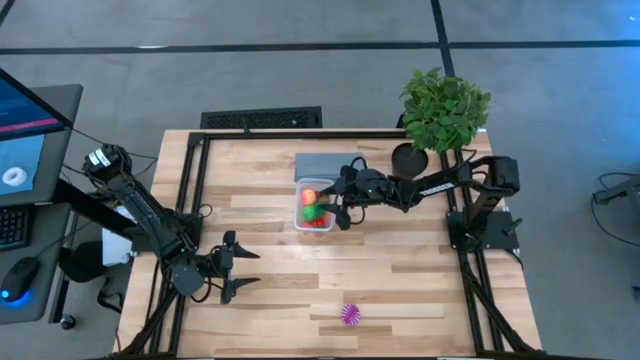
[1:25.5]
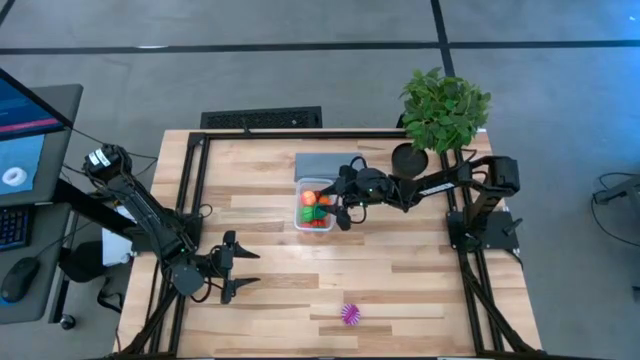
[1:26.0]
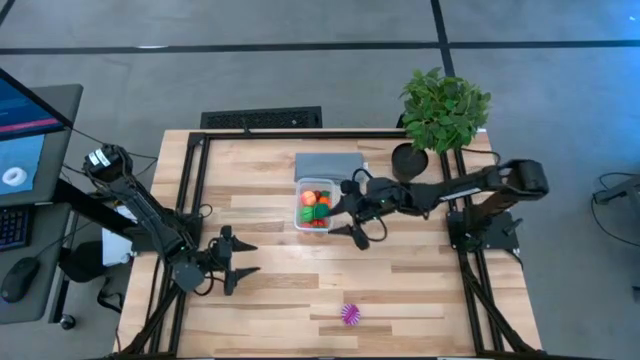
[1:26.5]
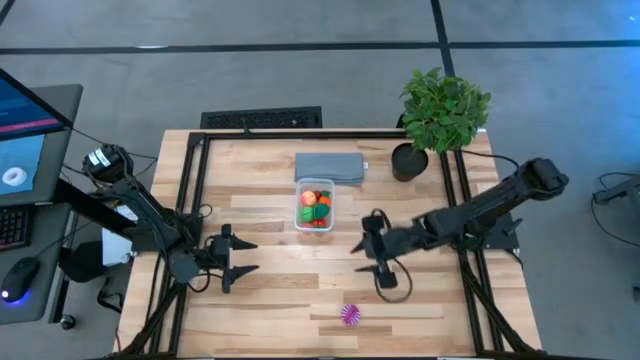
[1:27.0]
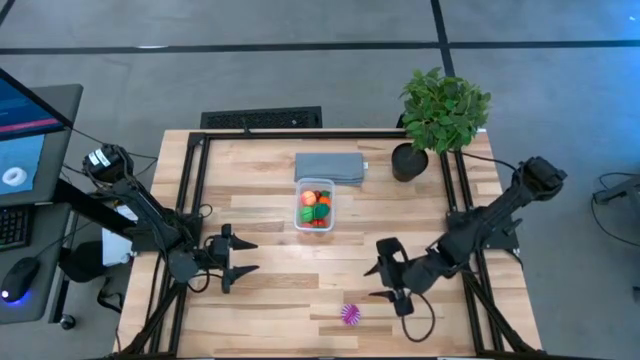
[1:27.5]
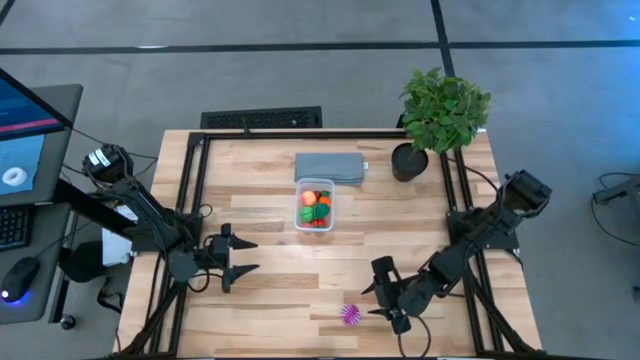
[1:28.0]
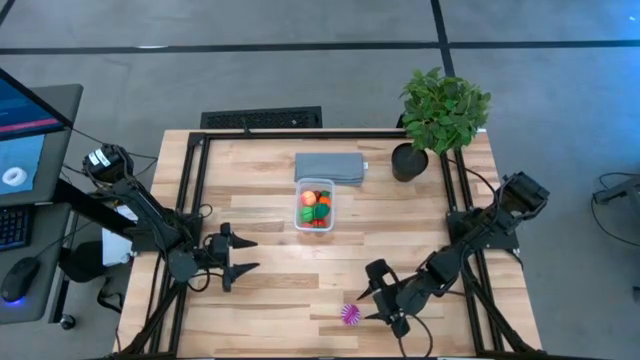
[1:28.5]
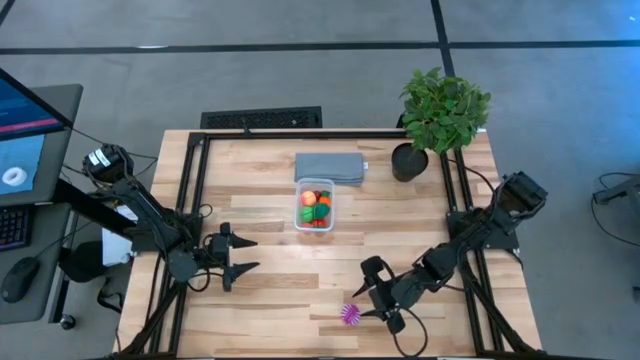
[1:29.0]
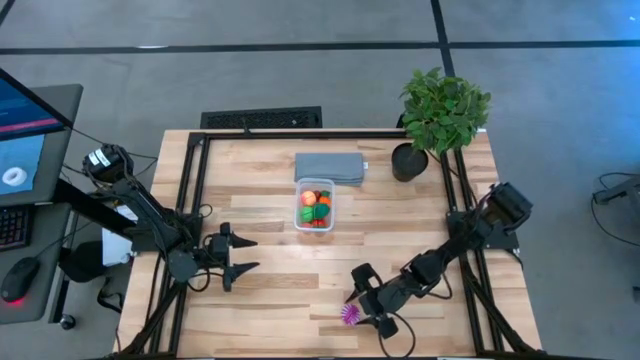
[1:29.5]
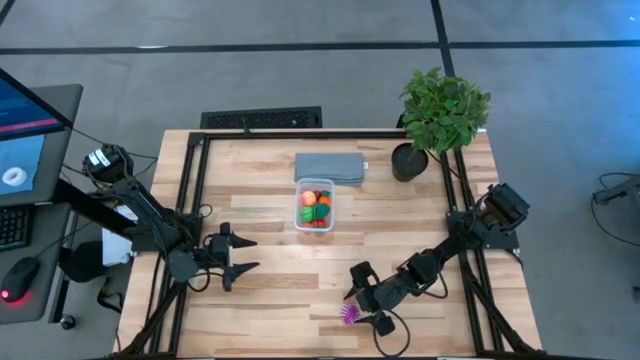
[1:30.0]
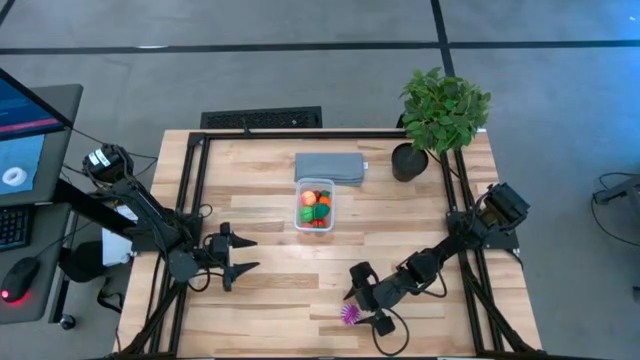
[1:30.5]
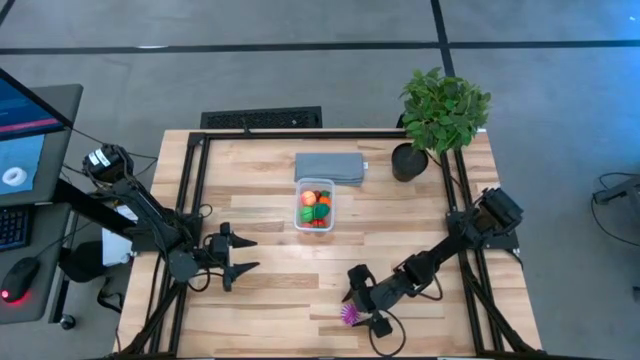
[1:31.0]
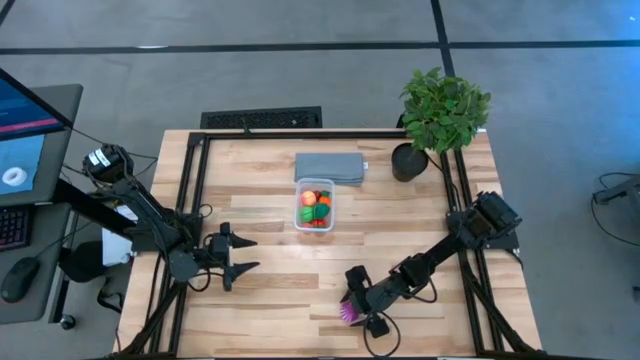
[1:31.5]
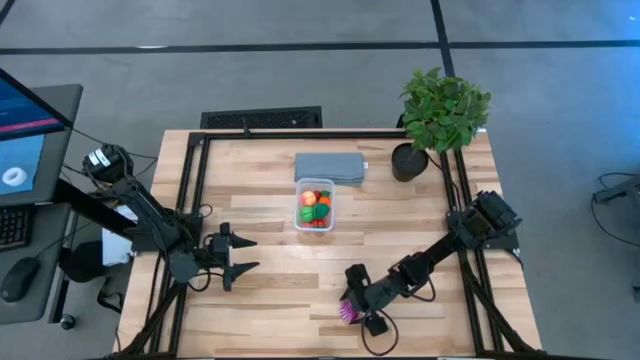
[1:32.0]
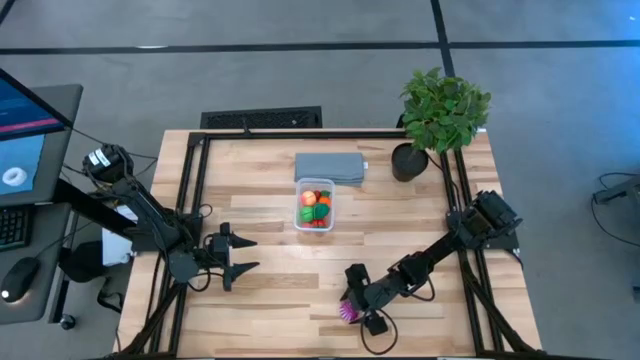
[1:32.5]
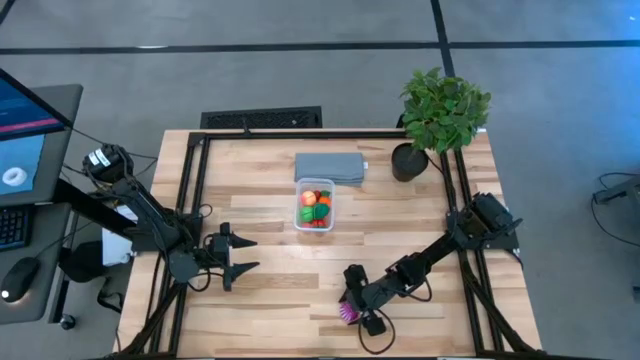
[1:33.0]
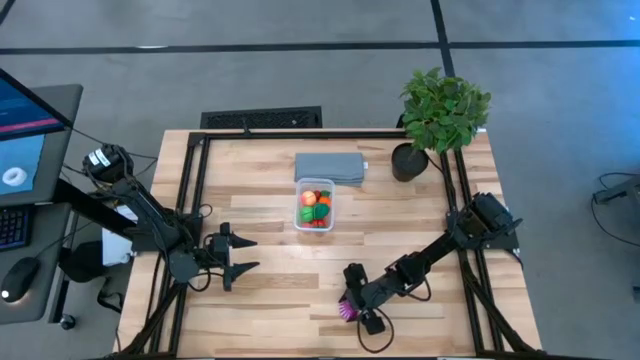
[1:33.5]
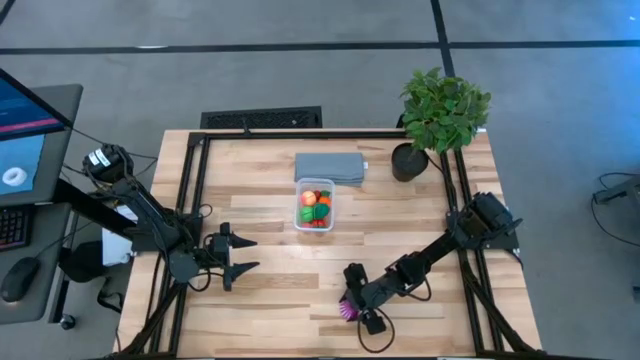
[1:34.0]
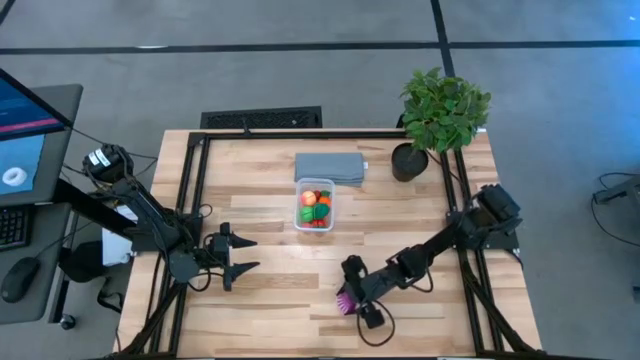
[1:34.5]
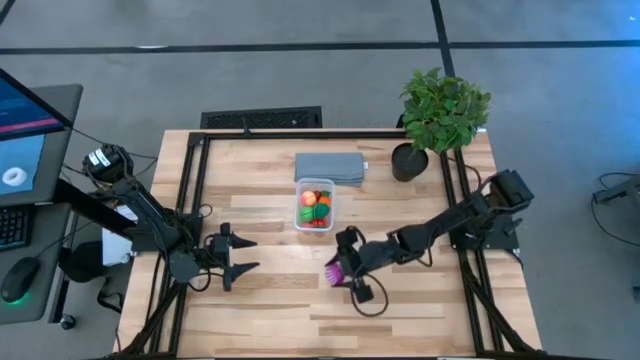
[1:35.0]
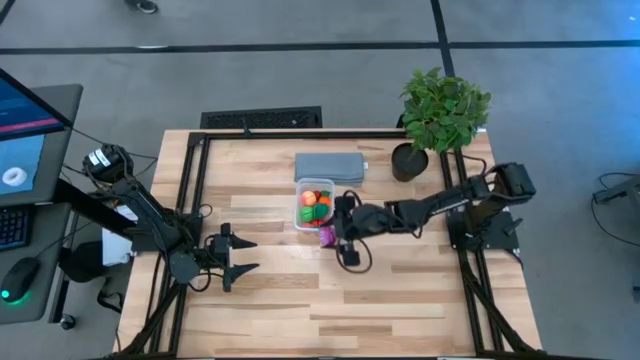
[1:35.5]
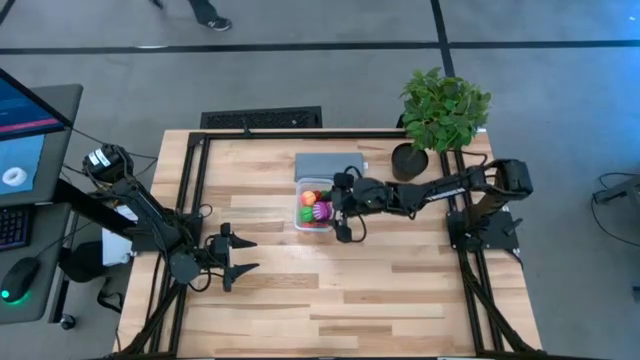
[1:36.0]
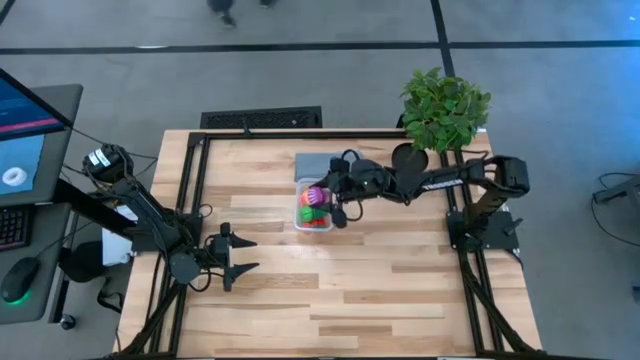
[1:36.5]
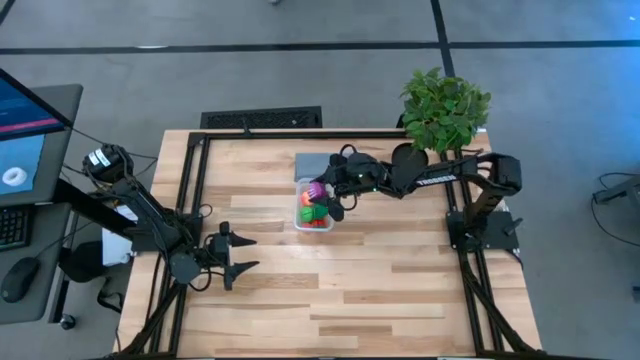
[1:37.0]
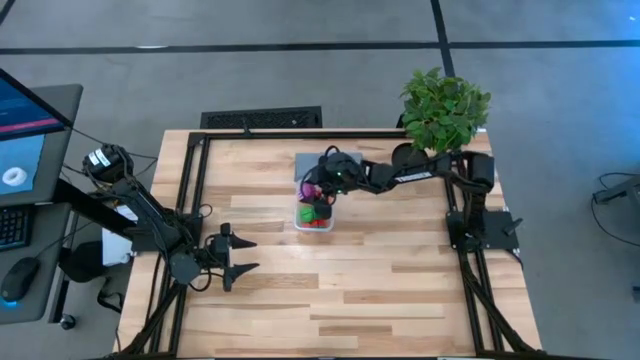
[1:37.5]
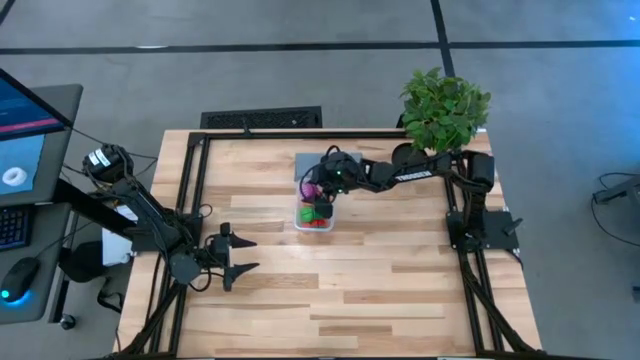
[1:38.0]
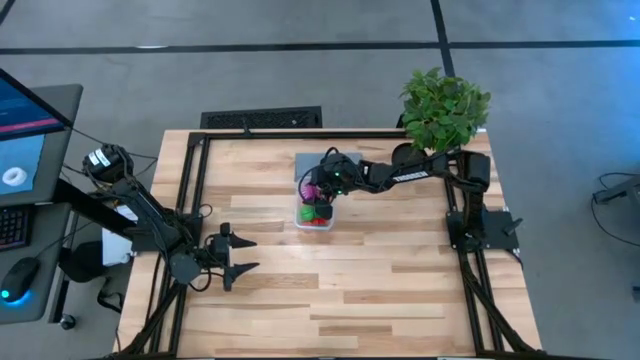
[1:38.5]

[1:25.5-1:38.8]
Task: Pick and placing Produce into tupperware
Put the purple onion into the transparent bin

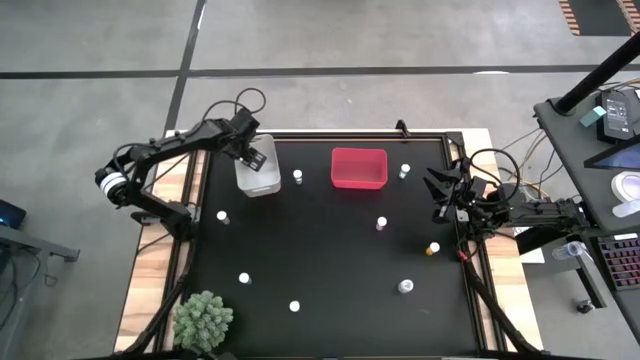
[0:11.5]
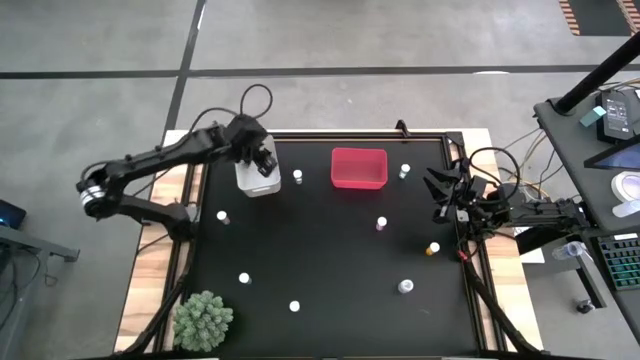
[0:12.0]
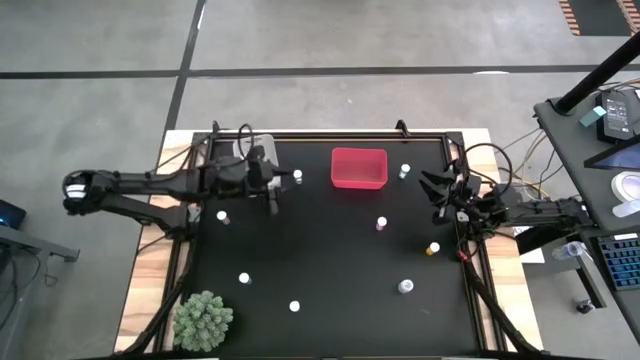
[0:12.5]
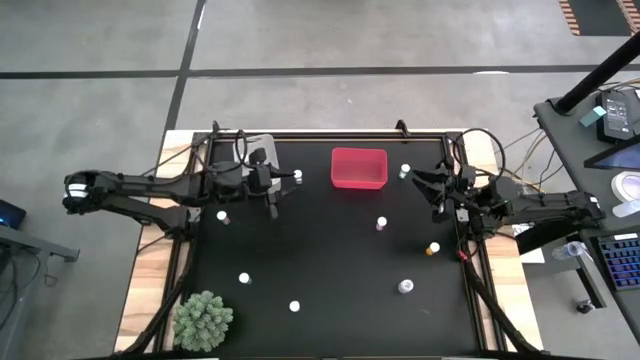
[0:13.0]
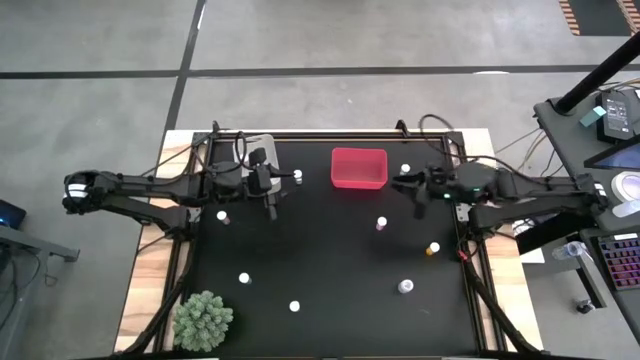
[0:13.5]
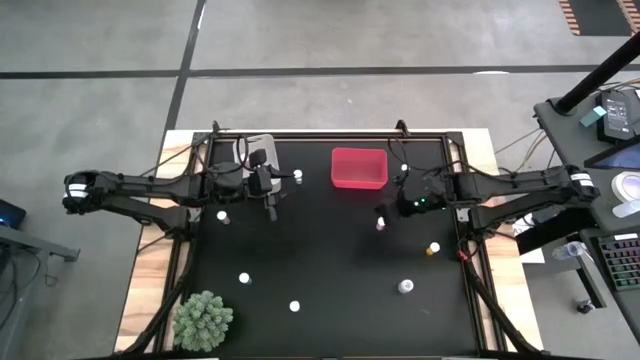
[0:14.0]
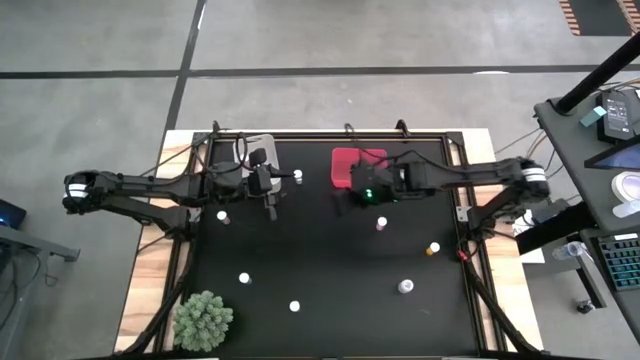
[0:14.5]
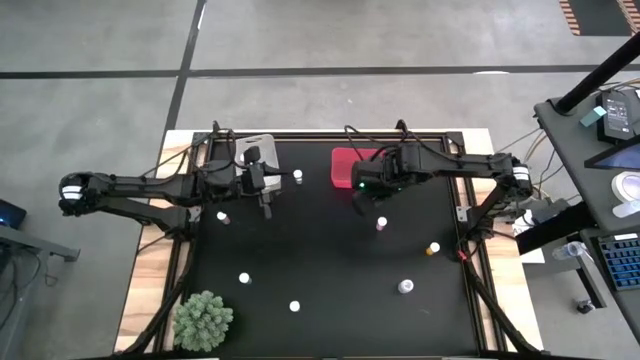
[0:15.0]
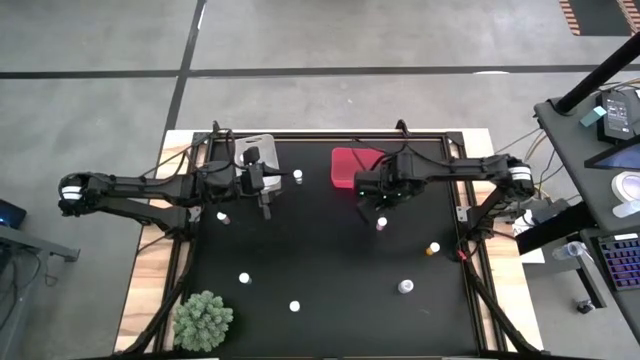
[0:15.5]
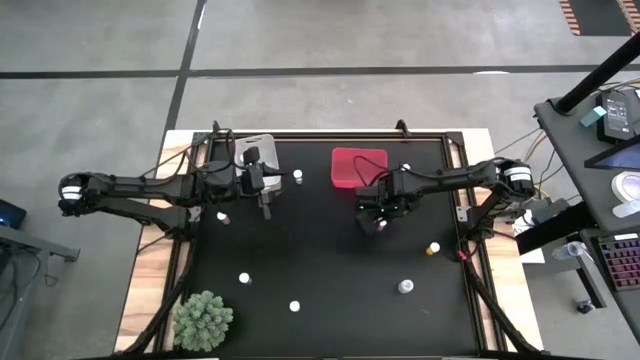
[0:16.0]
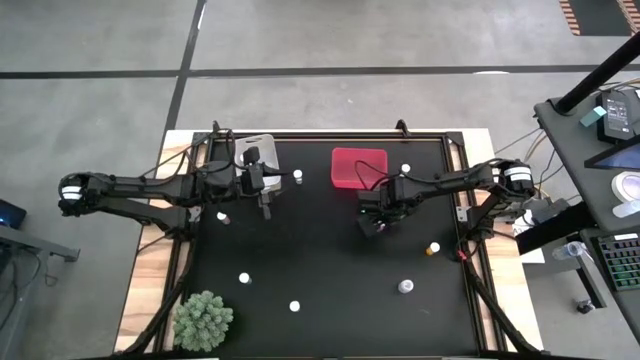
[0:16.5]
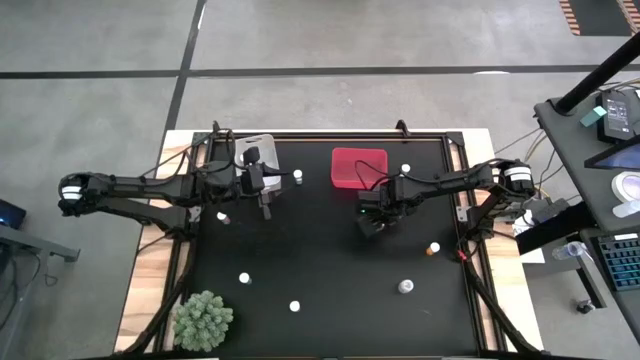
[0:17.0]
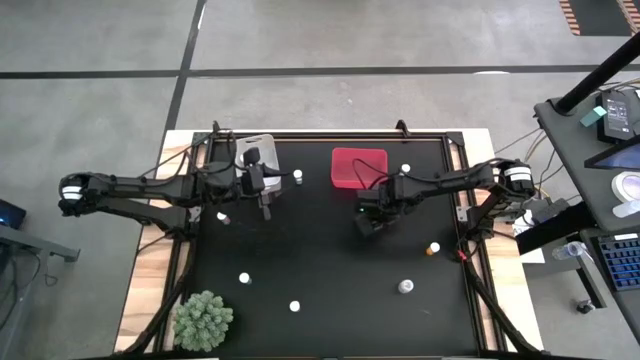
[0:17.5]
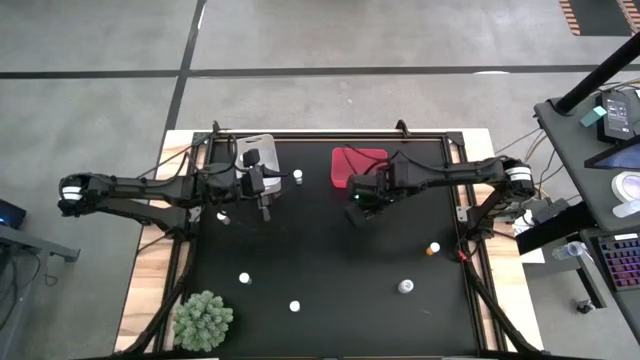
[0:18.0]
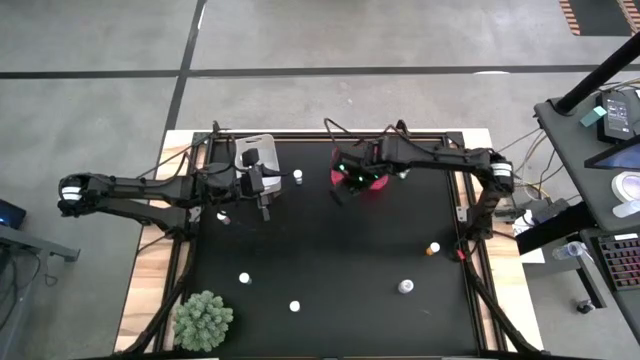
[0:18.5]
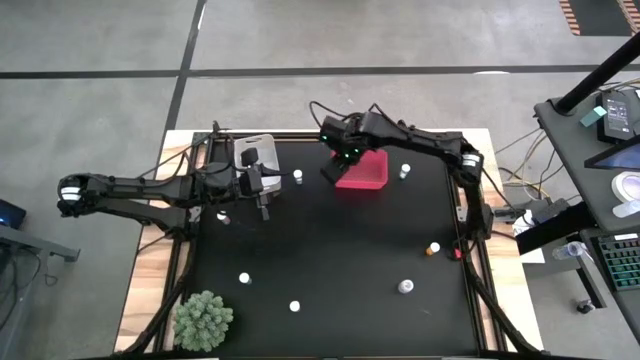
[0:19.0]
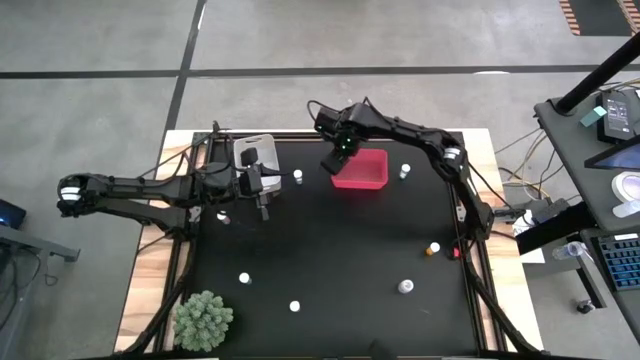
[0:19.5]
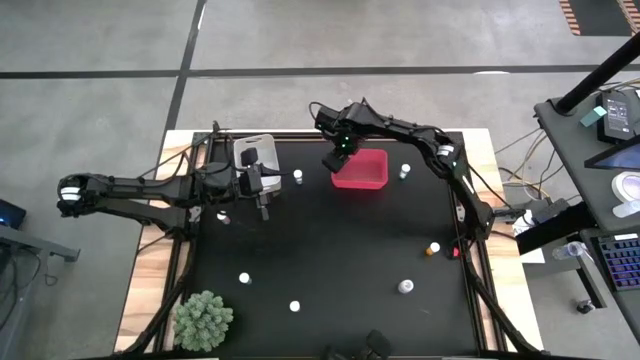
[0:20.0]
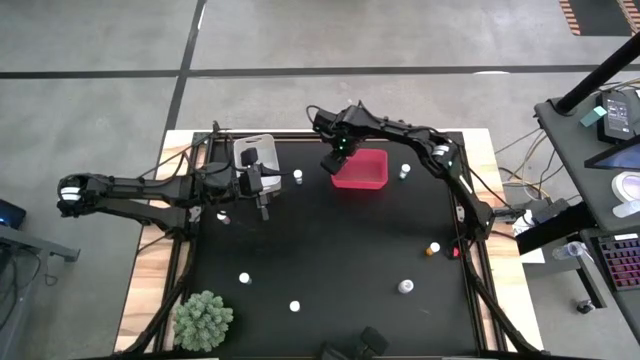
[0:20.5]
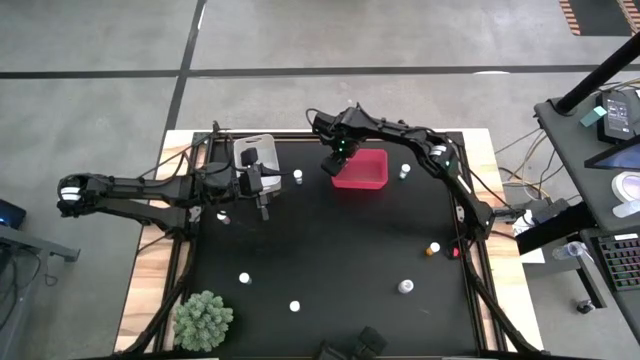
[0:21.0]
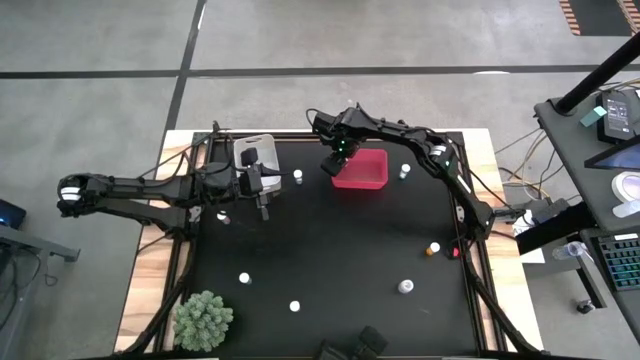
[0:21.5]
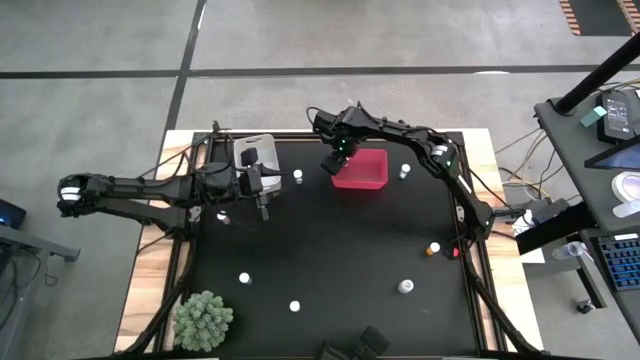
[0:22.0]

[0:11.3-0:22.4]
Task: Pick and place medicine bottles into bin by pill shape (circle, oval)
Put the pink tablet bottle into the red bin
